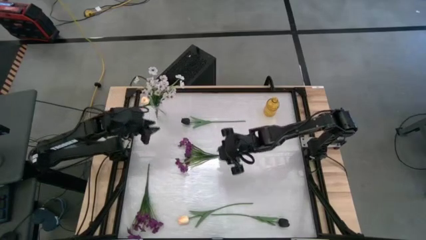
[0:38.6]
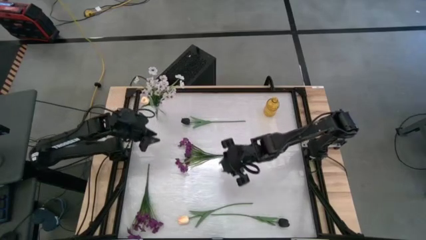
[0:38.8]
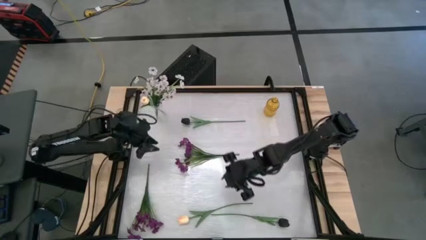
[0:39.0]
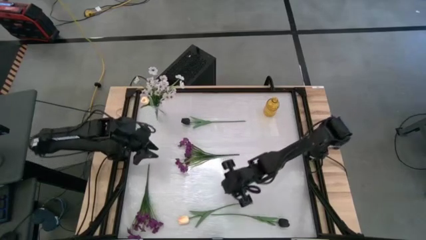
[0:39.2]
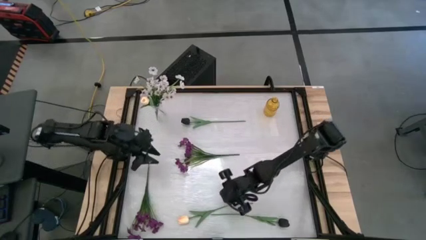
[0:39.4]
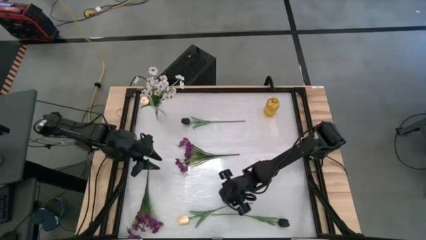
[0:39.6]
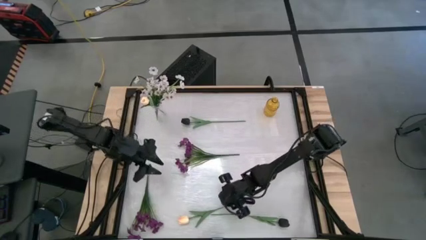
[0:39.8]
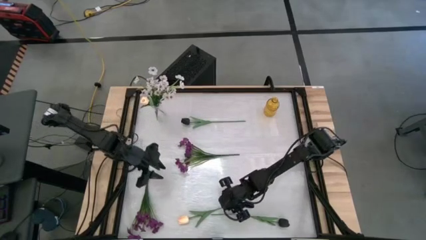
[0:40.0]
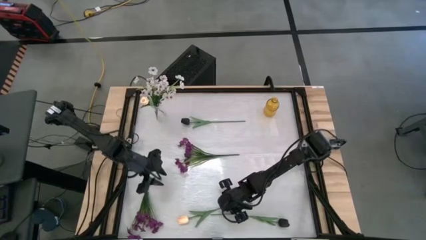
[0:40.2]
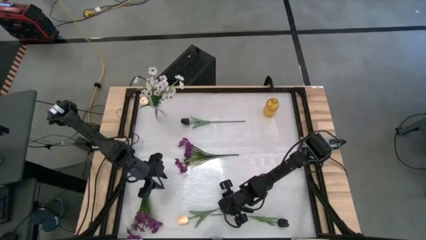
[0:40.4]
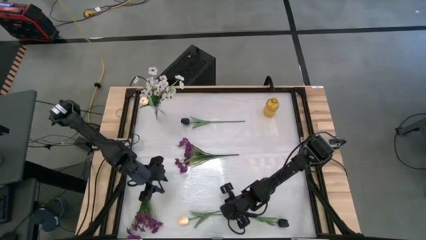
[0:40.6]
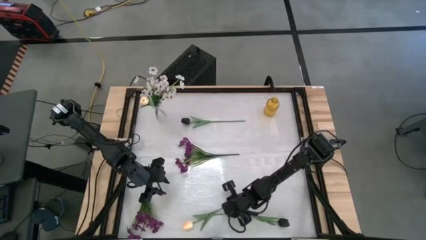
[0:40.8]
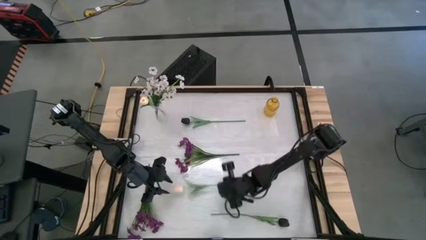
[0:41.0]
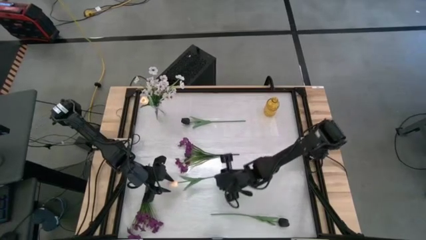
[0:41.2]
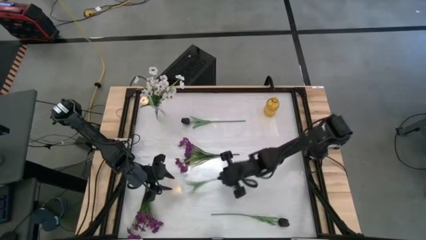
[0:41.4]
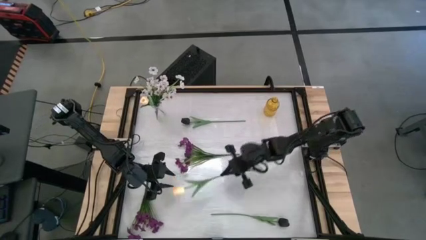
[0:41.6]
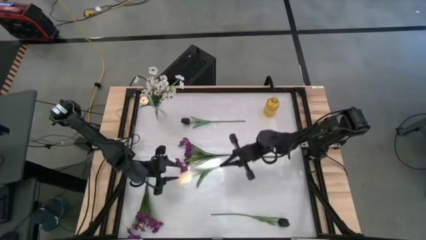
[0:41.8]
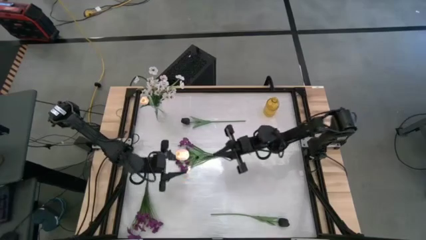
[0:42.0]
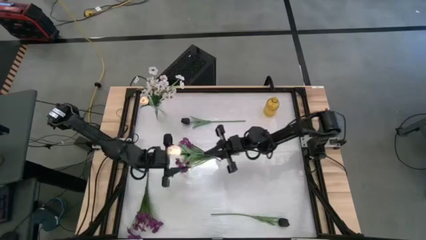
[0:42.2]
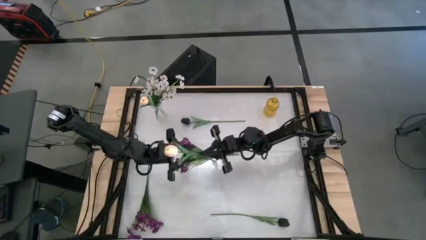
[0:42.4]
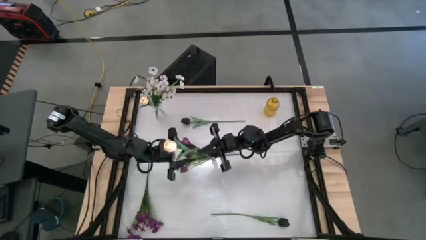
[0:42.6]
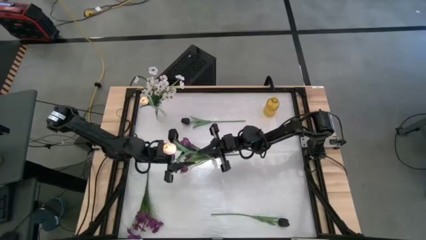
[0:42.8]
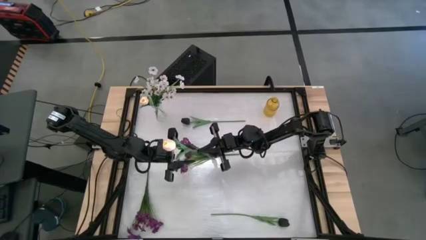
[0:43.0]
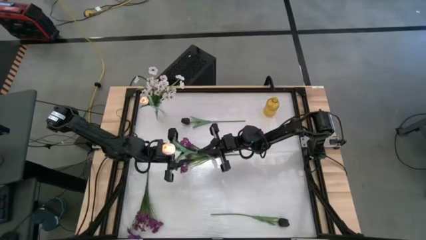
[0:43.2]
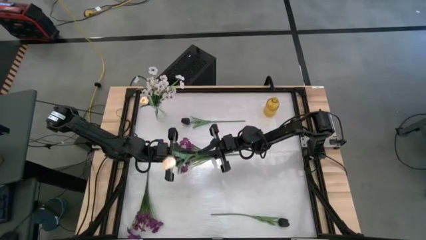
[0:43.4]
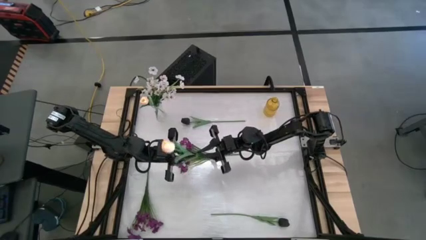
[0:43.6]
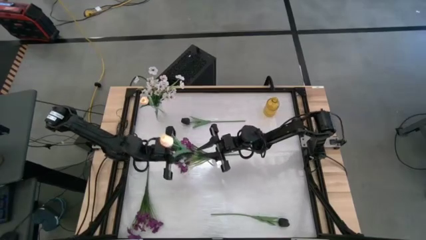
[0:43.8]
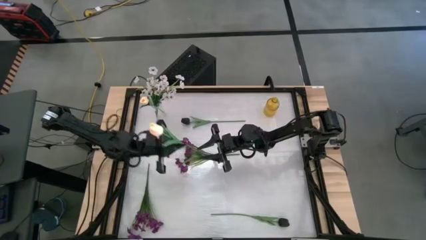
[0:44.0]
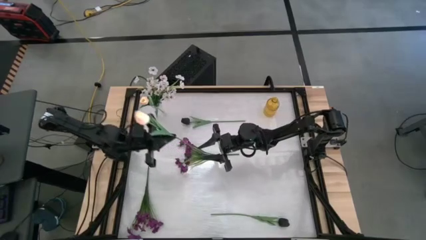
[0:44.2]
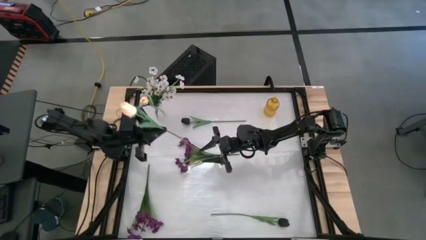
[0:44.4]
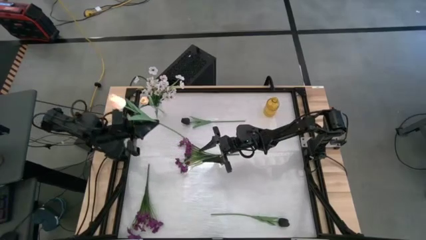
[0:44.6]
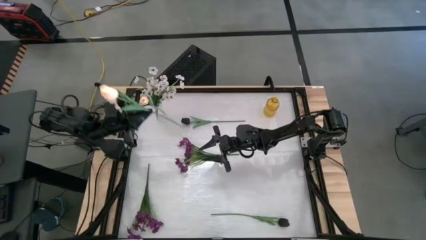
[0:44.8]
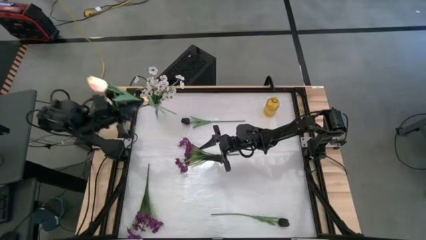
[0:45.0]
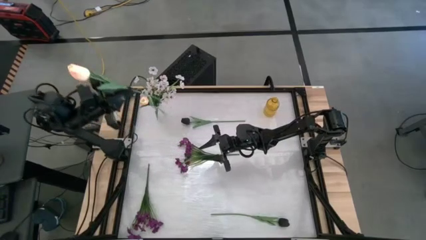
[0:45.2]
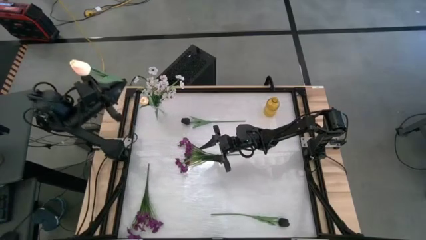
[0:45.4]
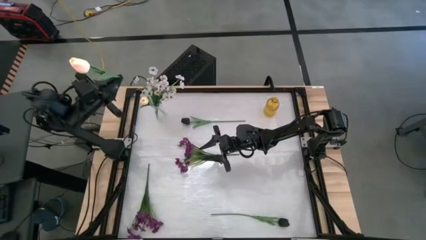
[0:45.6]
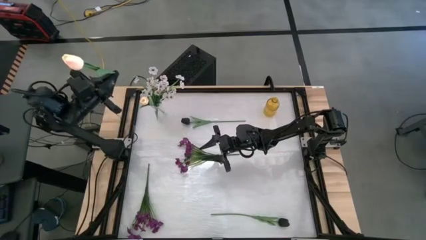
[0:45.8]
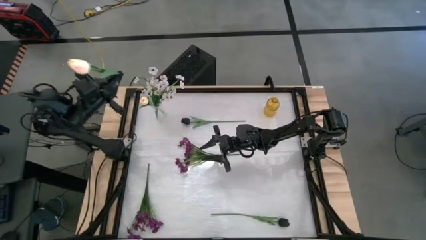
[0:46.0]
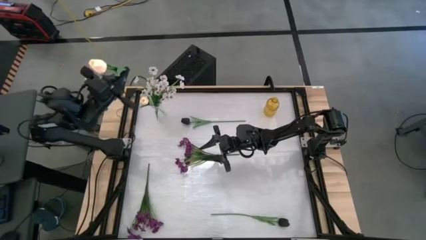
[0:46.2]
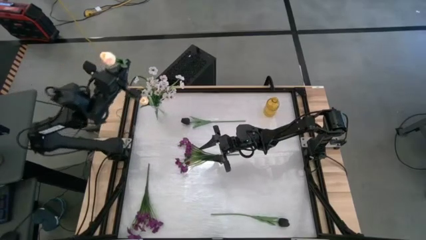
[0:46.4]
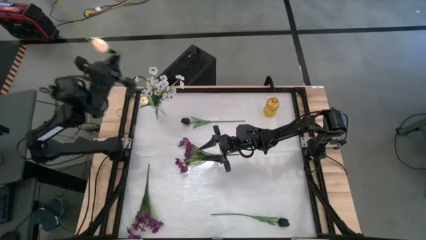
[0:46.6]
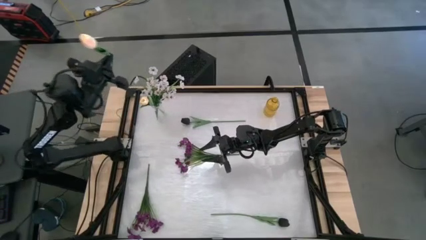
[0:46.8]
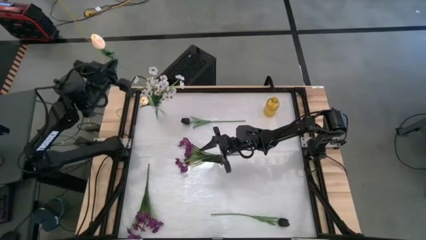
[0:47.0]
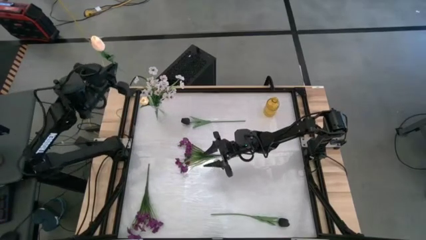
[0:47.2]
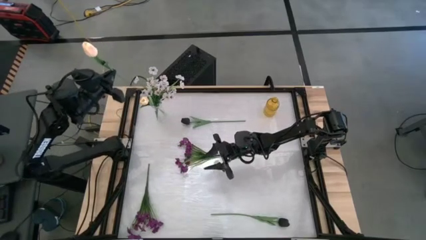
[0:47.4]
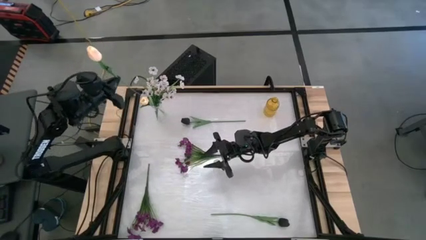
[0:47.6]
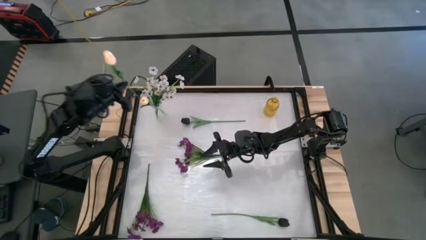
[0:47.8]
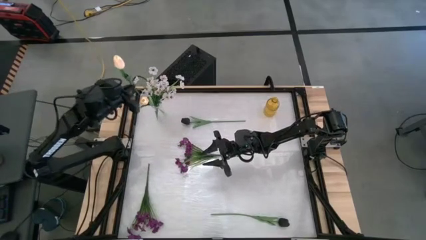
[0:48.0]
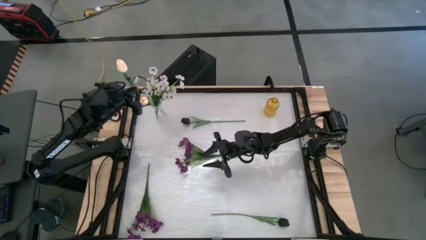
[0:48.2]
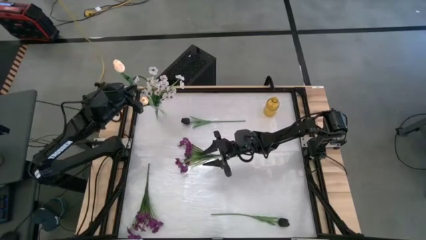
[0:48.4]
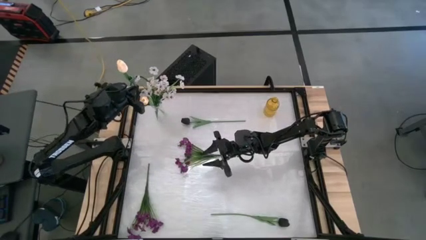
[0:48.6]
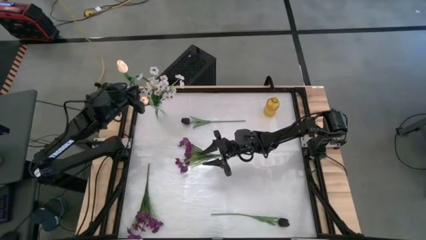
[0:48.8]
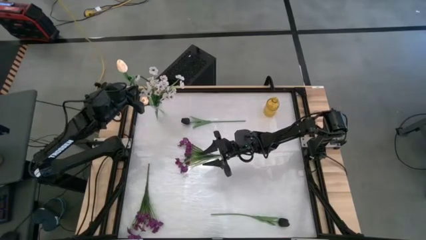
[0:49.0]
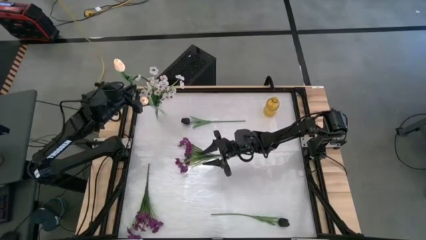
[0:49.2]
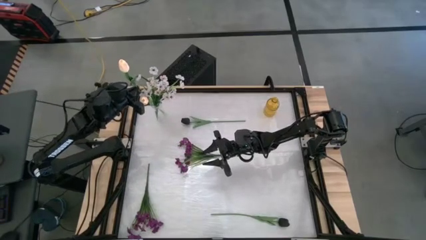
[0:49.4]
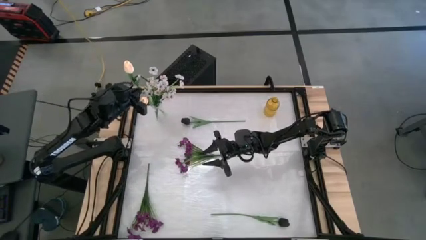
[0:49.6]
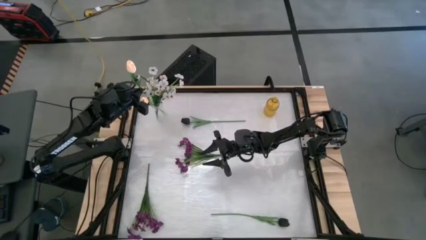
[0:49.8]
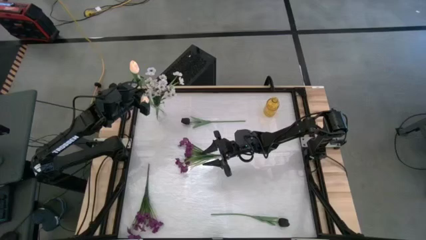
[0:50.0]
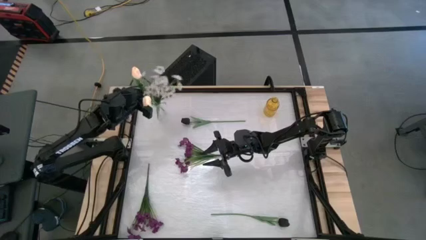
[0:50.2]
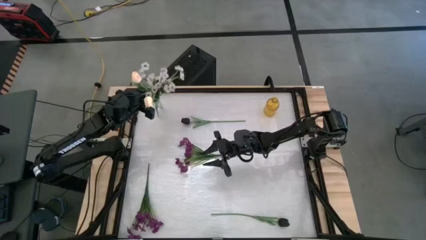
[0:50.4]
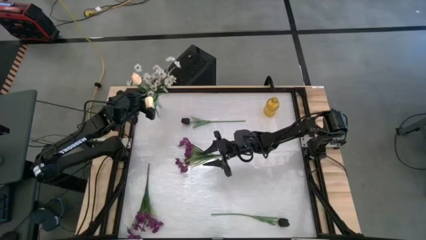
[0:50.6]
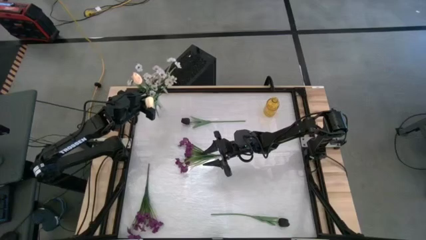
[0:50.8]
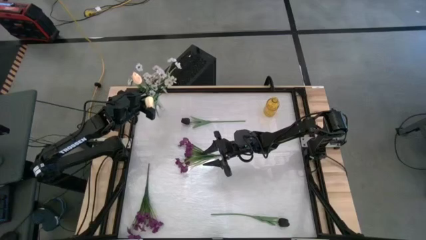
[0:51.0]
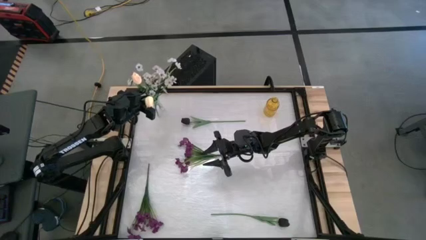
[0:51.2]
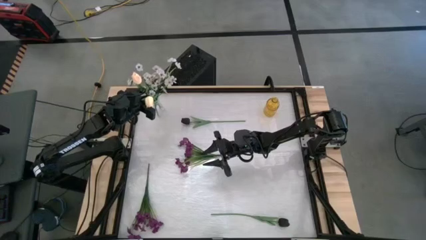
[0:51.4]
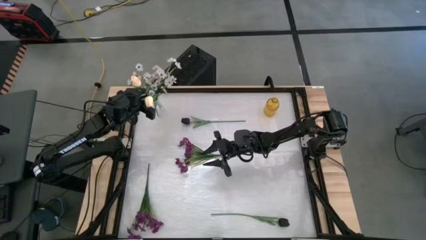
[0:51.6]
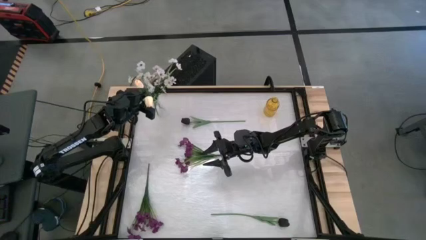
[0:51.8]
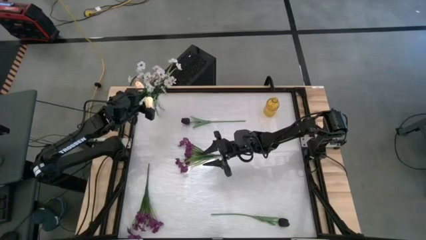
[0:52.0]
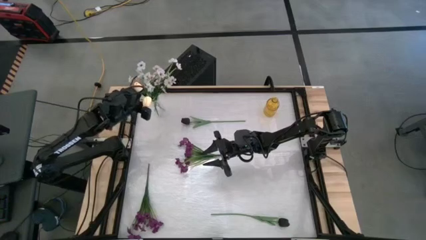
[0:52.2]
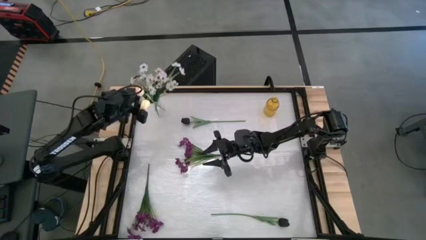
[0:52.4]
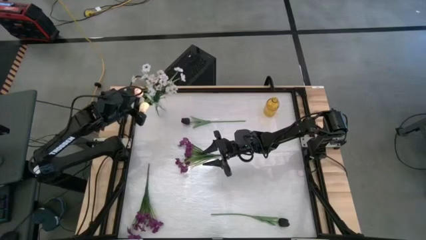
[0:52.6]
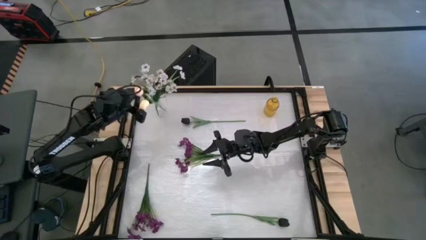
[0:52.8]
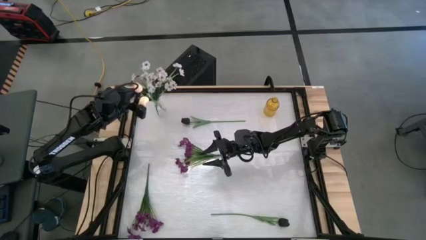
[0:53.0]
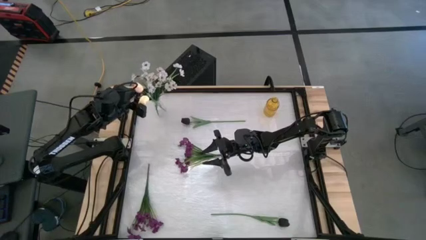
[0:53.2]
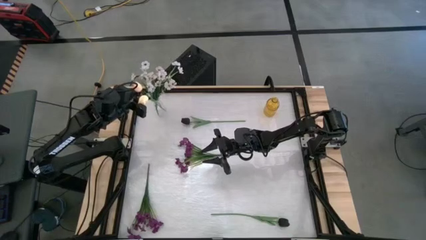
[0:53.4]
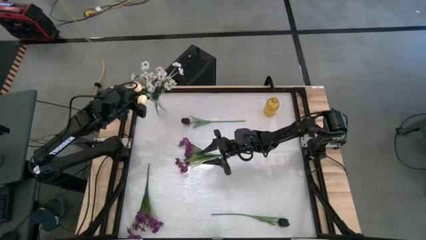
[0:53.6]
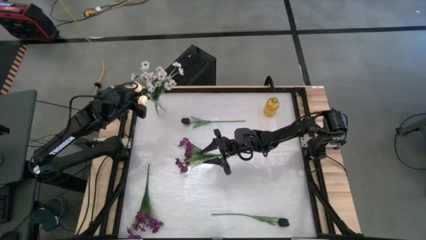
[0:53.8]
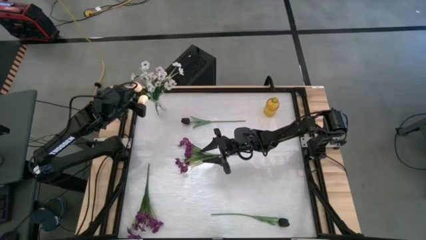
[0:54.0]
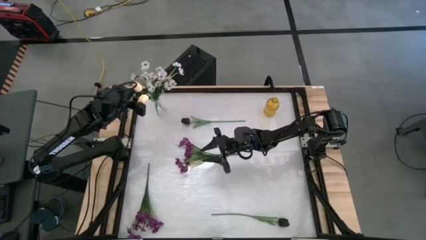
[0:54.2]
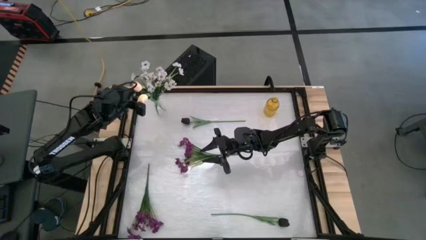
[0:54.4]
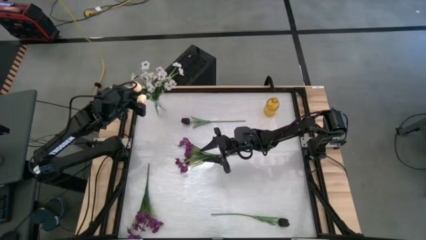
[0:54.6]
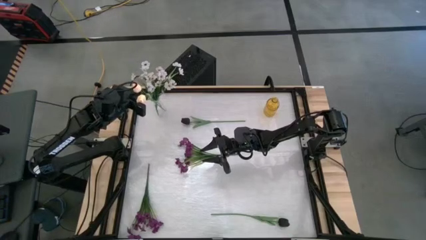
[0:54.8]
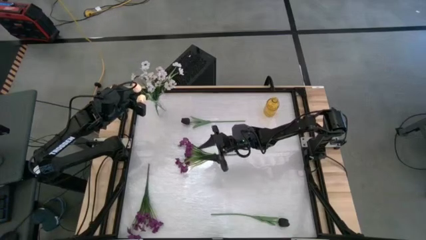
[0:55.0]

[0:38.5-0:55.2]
Task: Sort flowers into vase by color
Put the white tulip into the transparent vase
